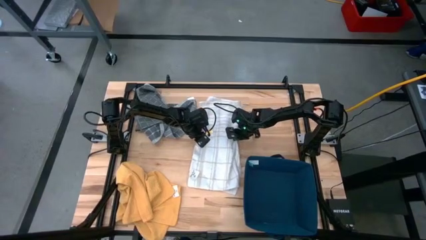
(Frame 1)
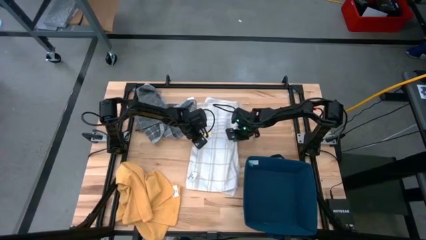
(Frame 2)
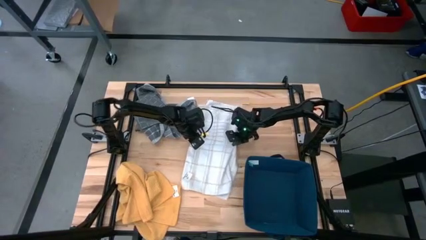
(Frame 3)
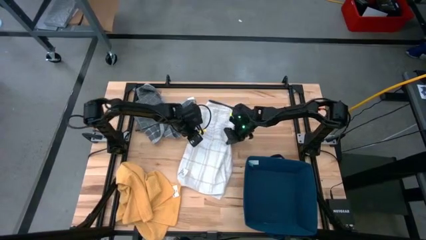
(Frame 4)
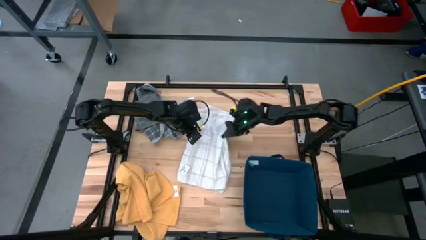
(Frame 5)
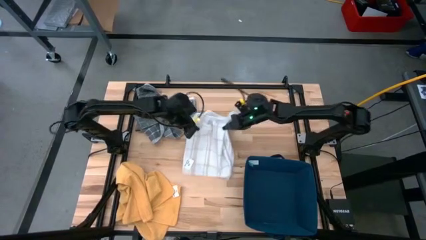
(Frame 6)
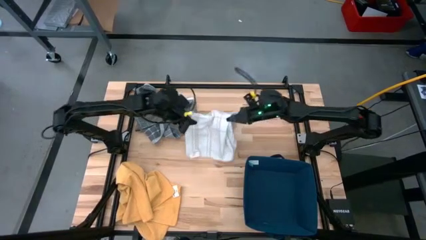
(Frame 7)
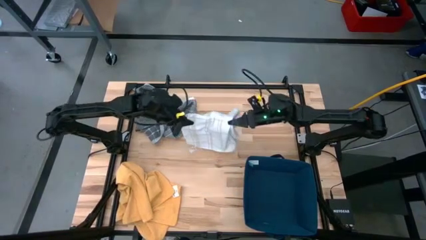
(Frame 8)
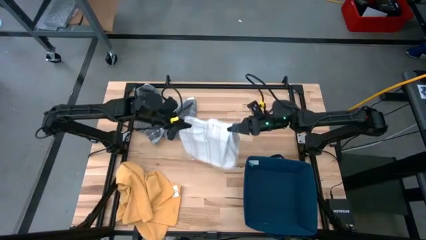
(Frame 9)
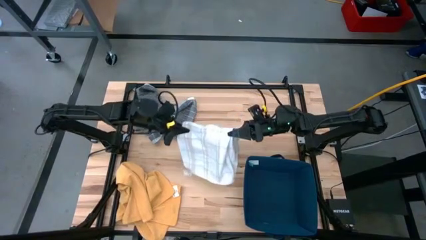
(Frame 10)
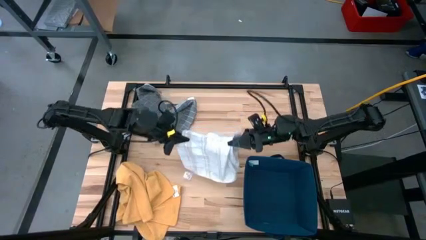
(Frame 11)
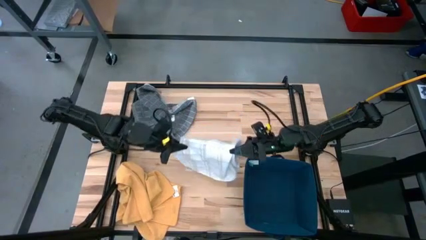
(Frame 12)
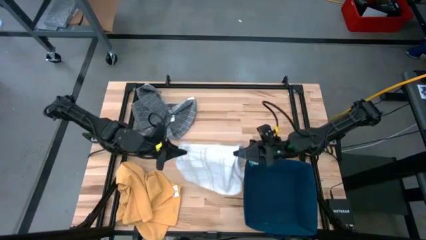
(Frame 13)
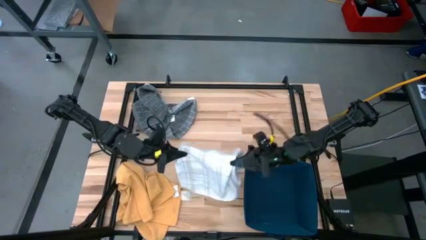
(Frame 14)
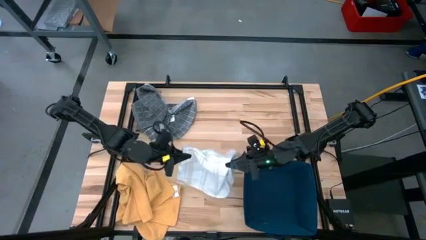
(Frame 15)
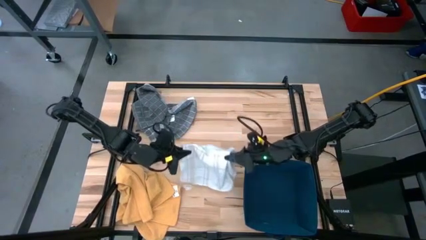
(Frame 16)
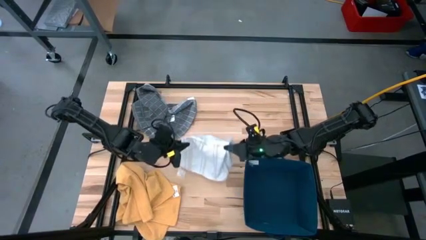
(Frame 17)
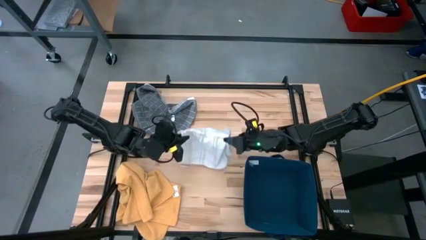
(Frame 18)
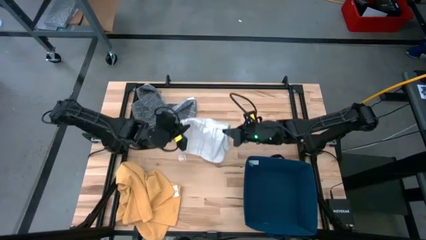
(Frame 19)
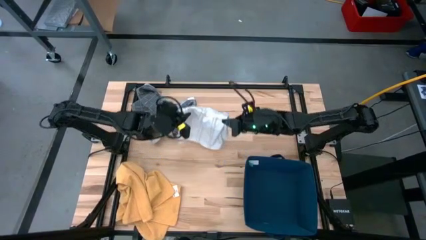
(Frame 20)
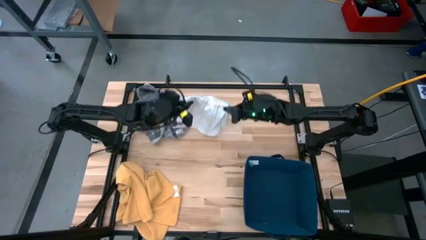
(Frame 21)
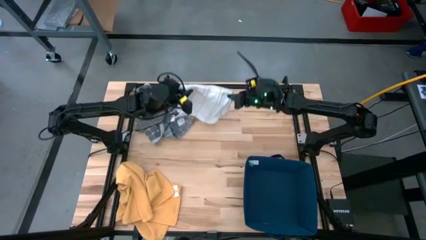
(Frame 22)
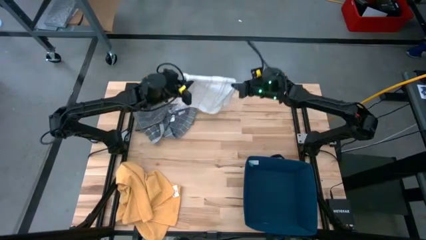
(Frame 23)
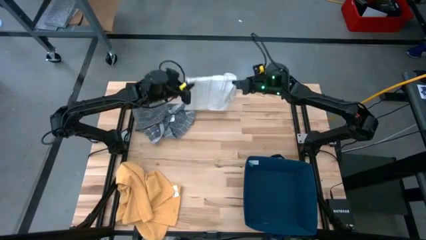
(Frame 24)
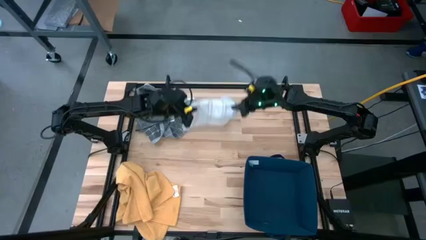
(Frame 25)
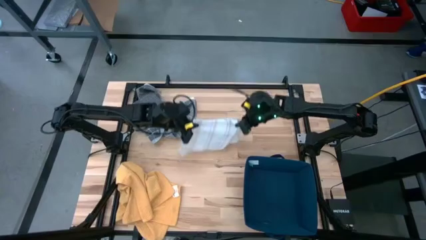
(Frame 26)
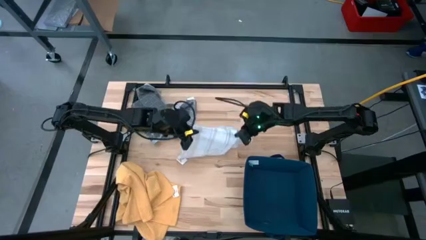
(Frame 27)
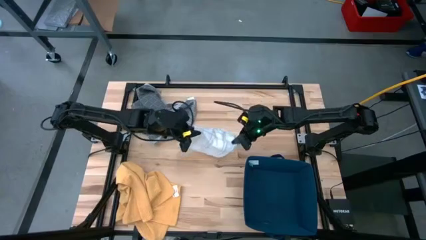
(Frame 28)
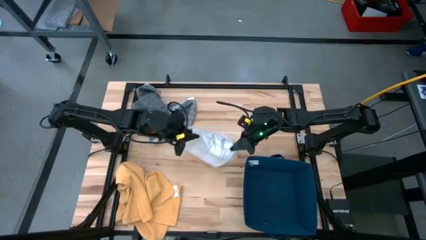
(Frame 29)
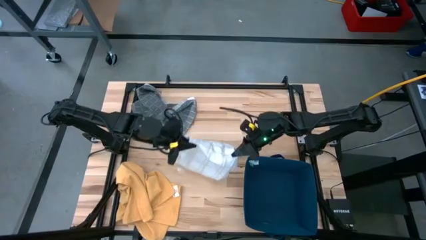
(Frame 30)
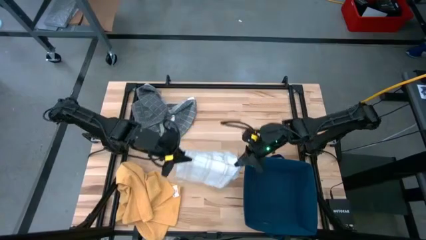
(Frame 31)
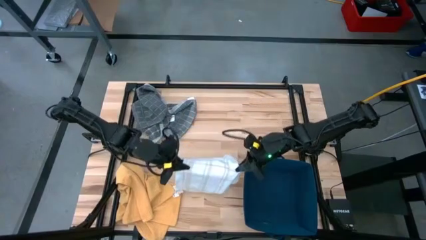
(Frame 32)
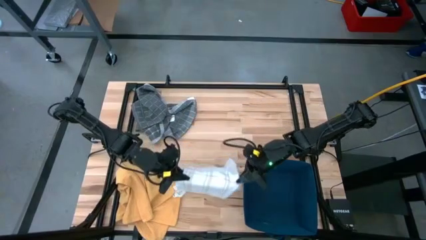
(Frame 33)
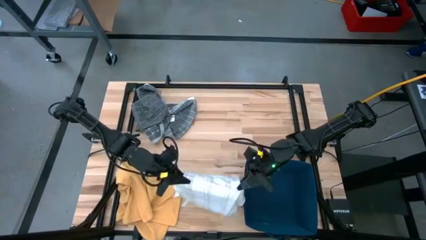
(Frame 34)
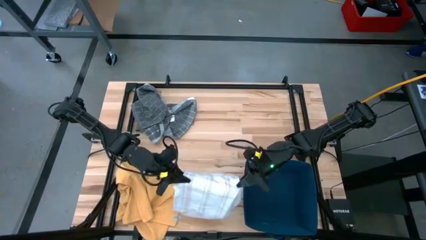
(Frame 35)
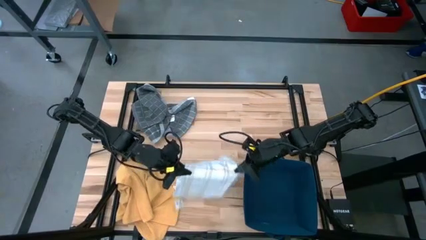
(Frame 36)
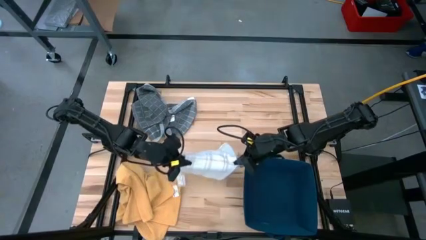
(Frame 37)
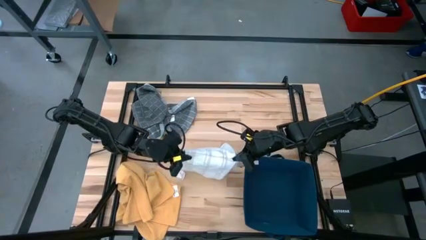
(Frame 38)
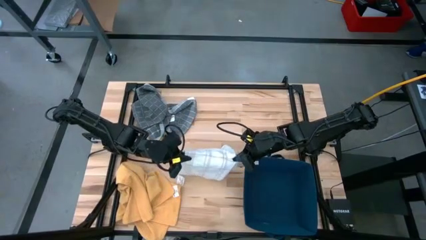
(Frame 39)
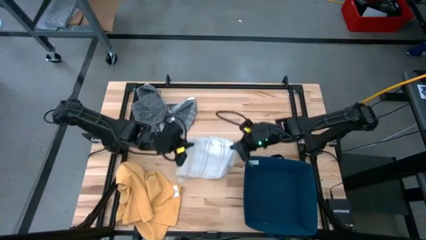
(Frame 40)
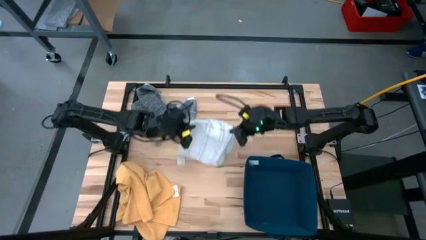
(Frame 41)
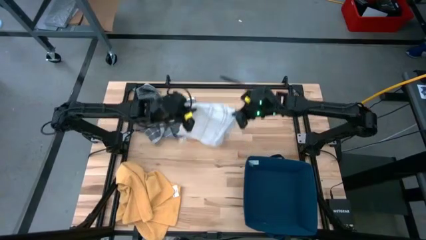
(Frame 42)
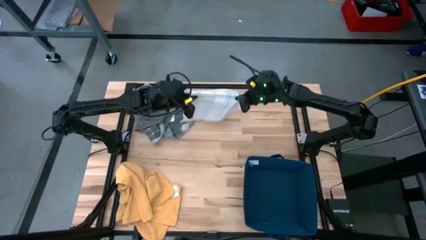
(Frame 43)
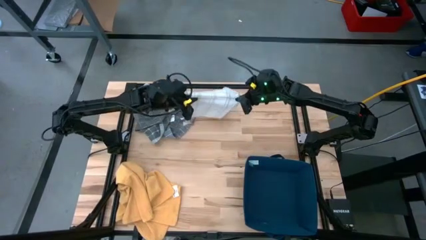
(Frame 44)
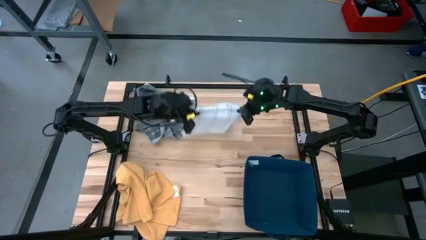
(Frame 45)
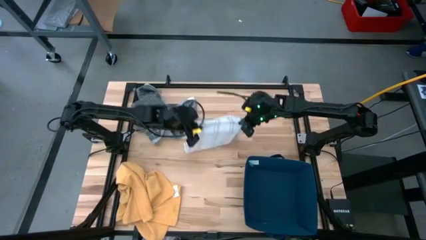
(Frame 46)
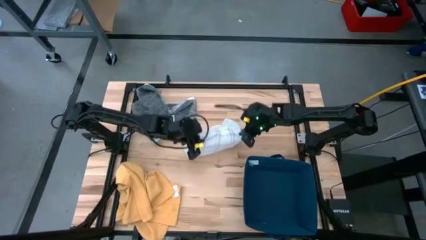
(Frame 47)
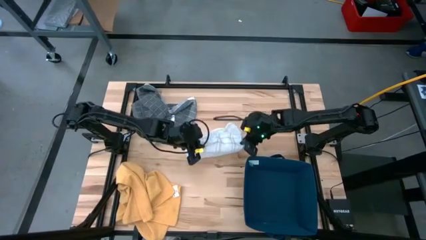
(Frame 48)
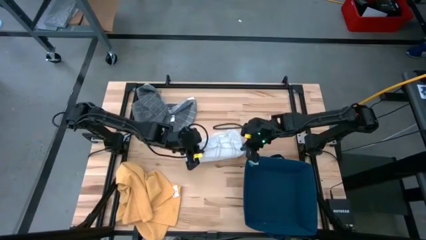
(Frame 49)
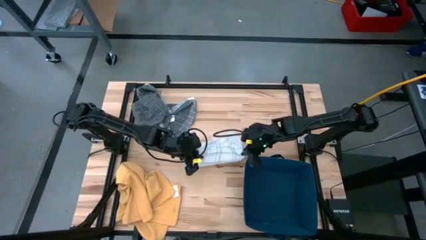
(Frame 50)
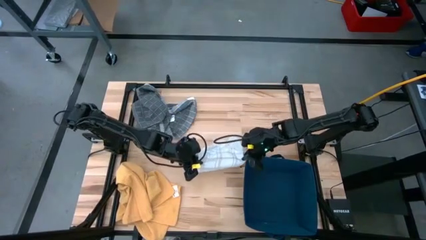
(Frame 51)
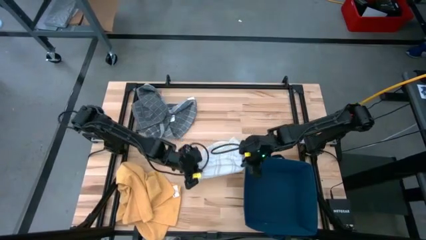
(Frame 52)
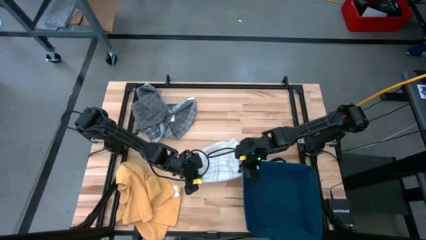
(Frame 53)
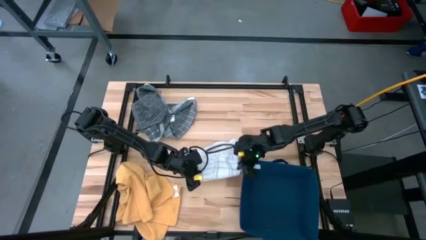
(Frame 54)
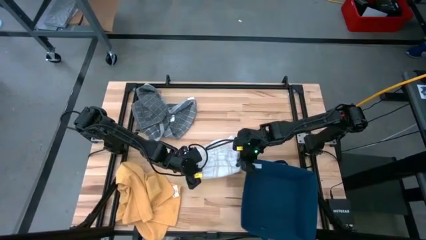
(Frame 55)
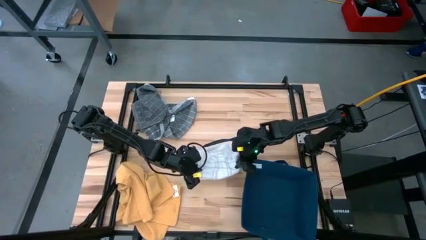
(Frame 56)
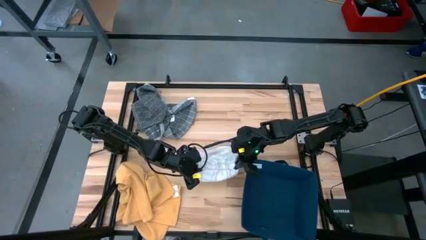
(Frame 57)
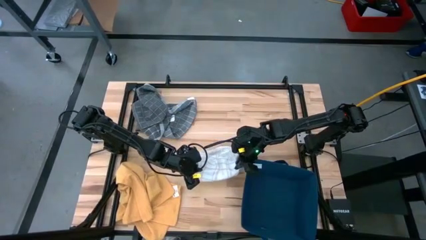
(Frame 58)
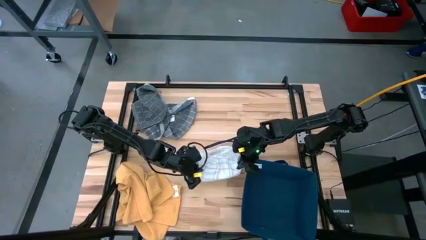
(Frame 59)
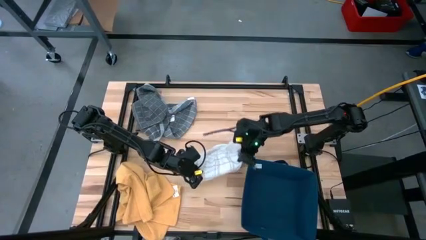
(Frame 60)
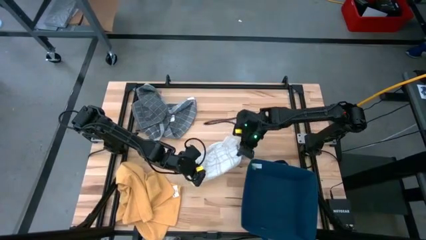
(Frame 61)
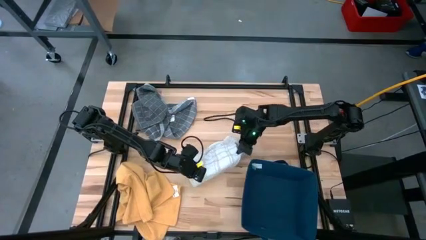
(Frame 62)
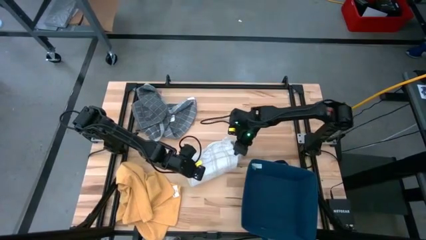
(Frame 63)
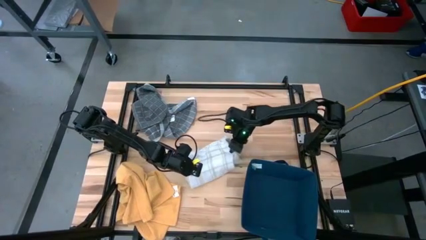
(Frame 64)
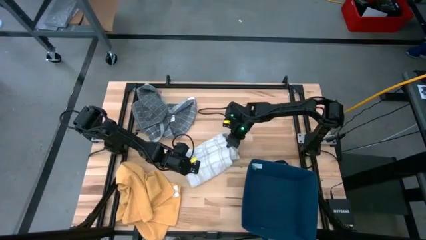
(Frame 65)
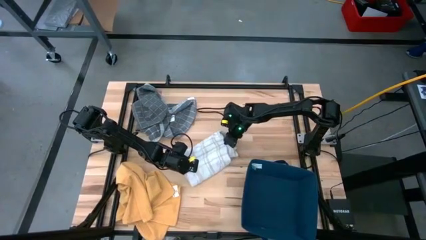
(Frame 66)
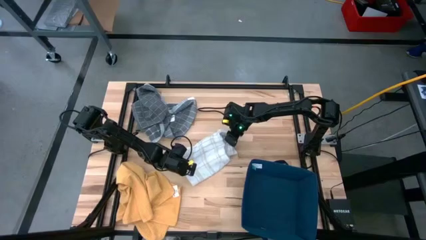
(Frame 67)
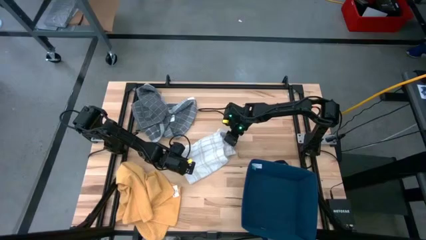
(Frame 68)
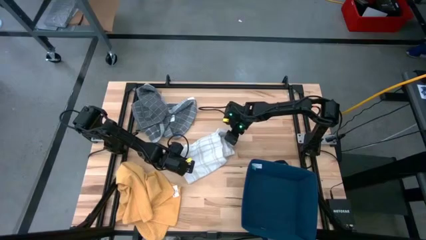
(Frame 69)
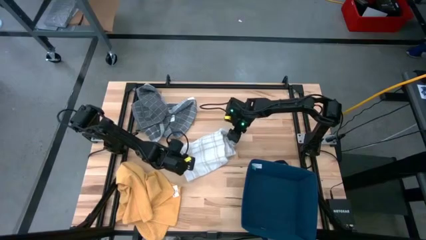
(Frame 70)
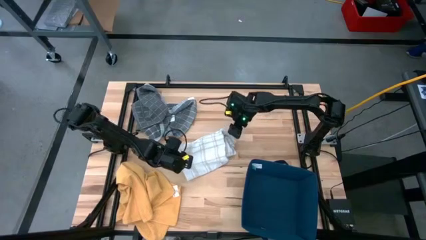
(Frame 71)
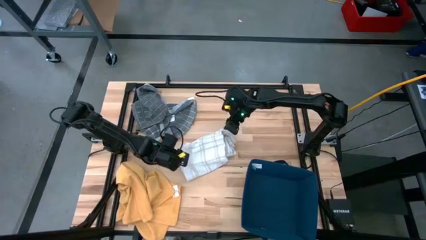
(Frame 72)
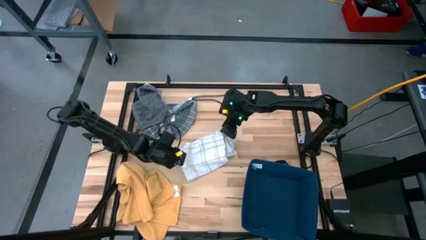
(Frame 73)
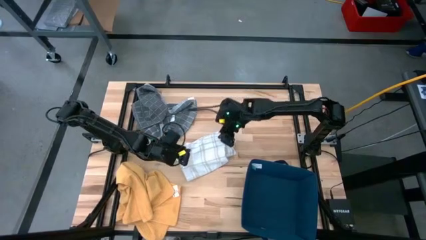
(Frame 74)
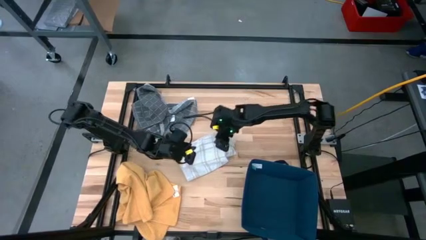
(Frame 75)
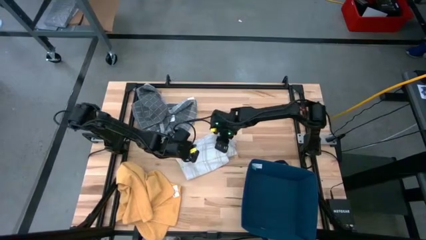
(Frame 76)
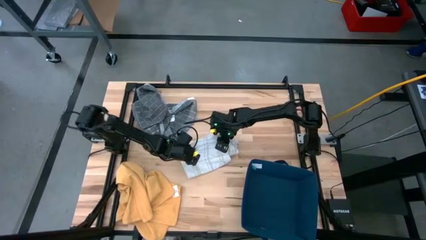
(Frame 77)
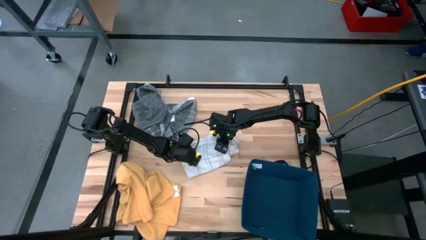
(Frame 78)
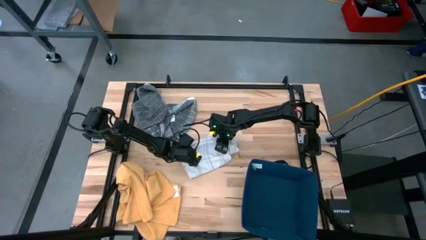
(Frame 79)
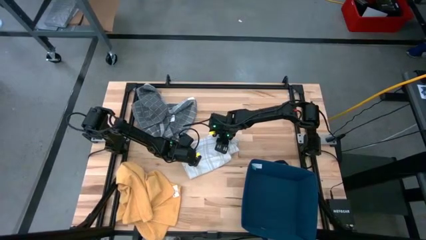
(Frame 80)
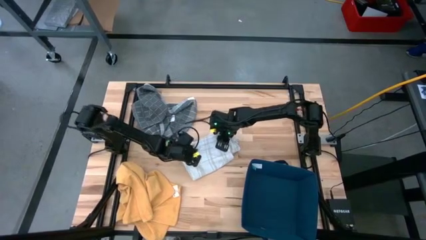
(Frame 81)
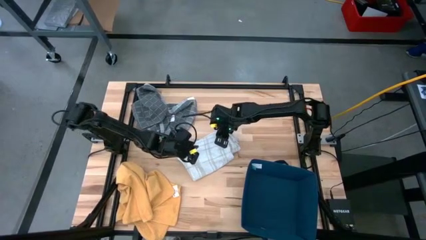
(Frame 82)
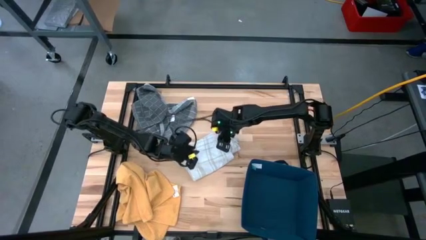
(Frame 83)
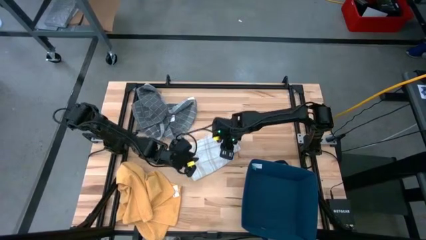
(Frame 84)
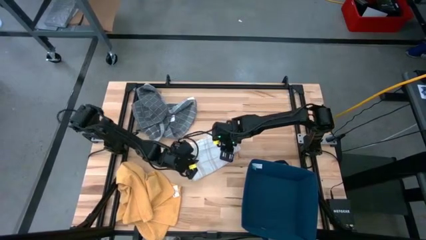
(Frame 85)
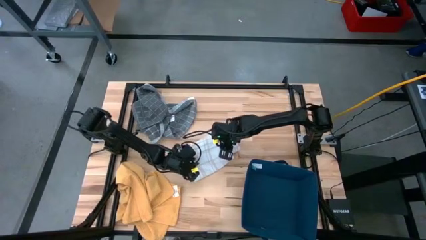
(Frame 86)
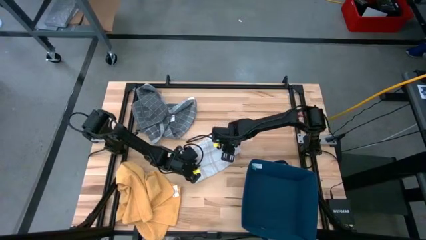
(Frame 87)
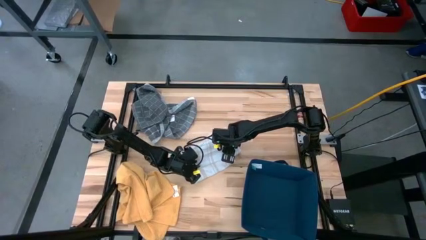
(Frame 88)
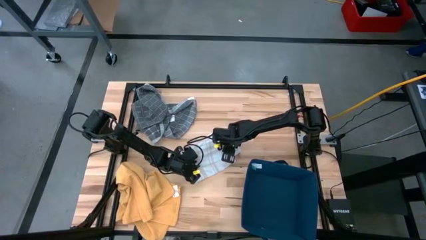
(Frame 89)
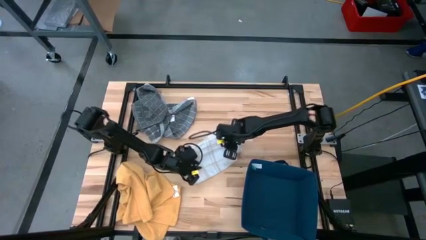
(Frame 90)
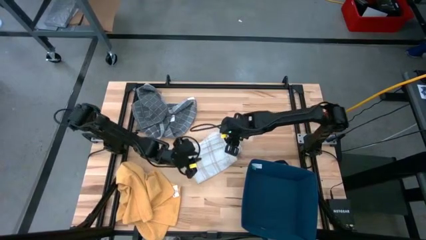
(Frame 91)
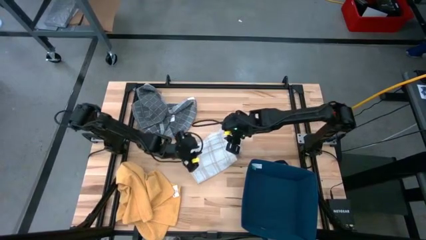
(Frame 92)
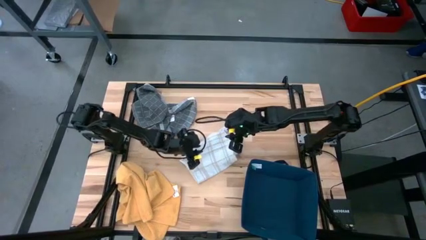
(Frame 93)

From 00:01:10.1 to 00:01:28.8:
Task: Fold towel
Fold the white kitchen towel
